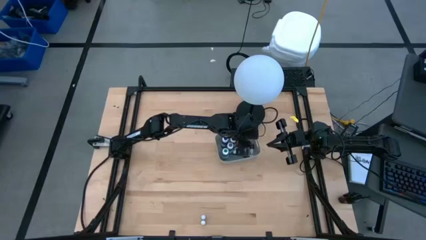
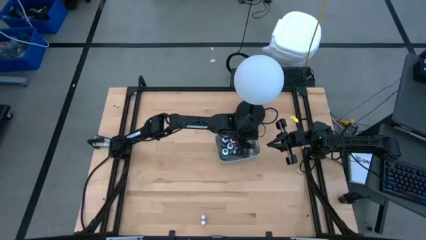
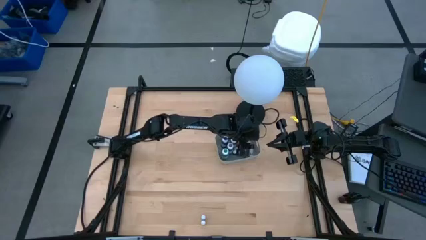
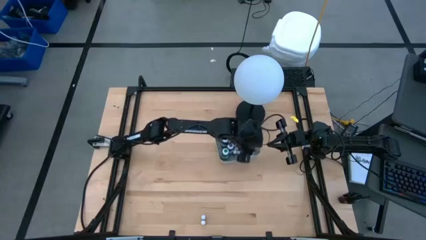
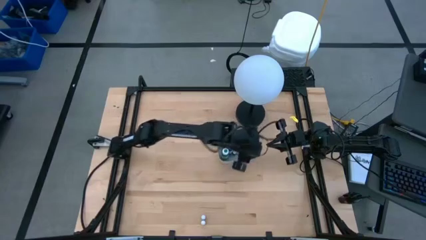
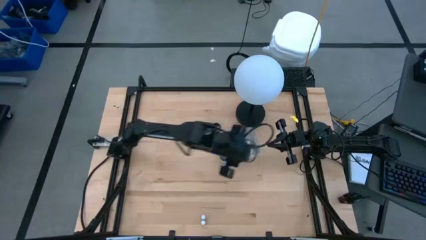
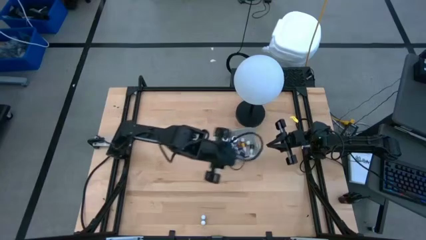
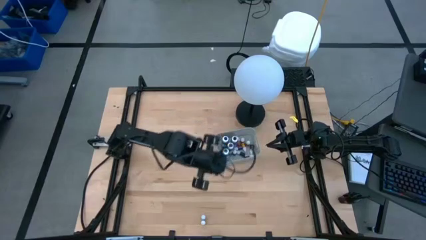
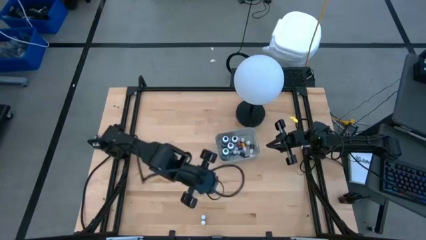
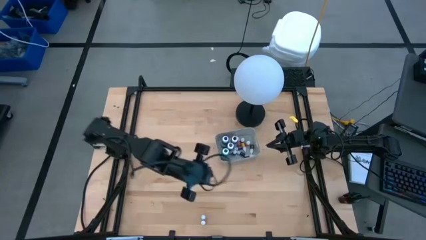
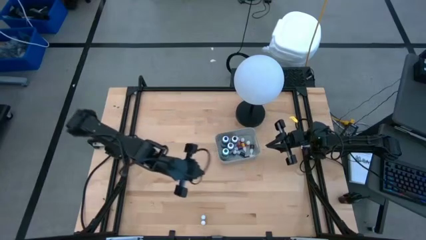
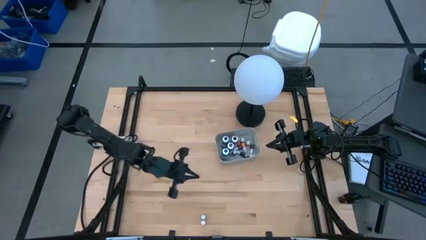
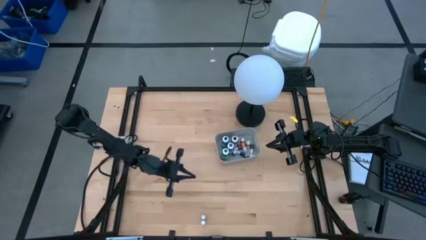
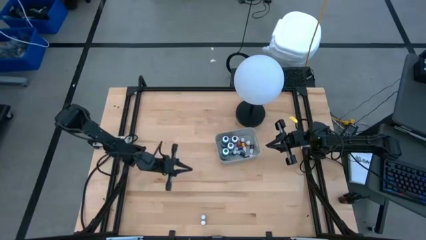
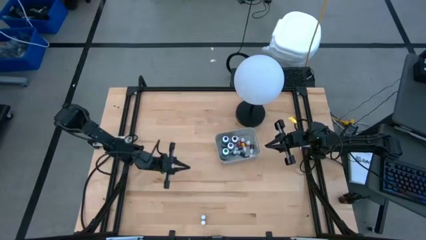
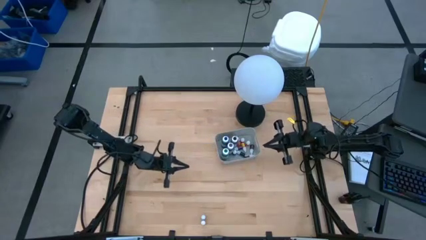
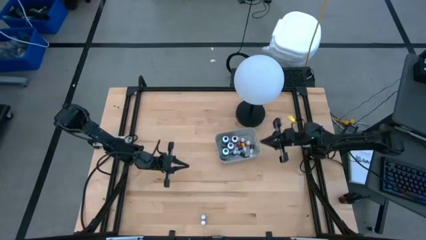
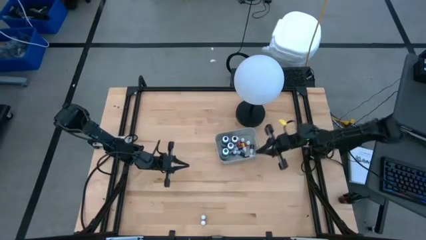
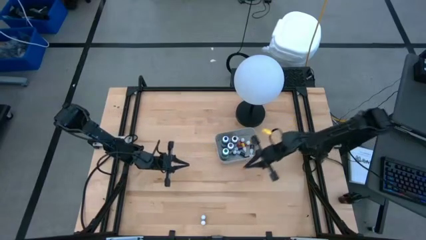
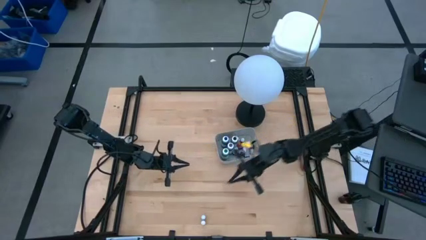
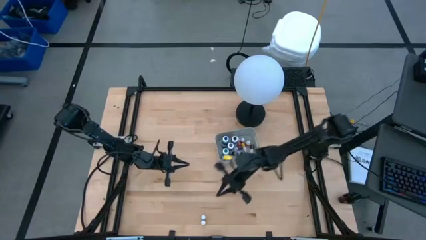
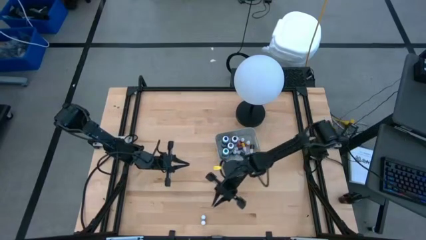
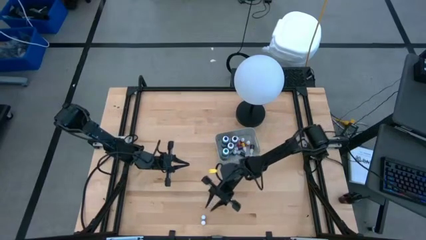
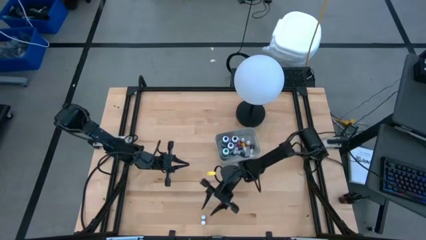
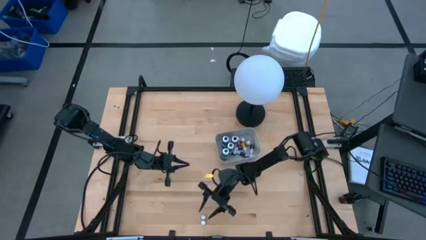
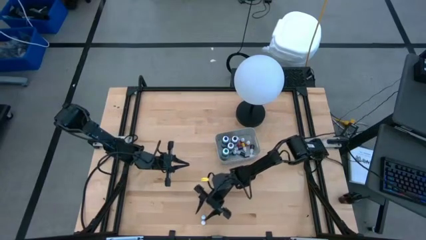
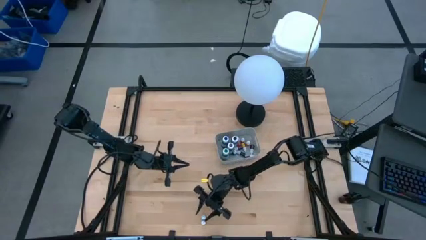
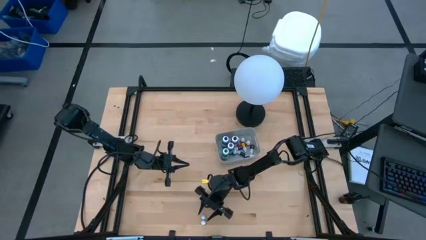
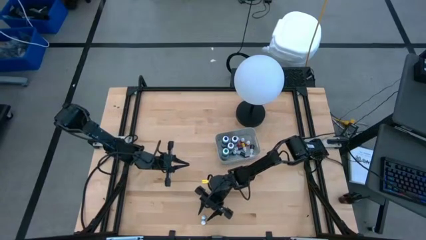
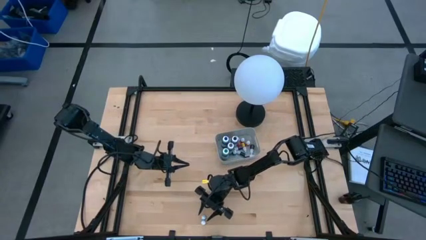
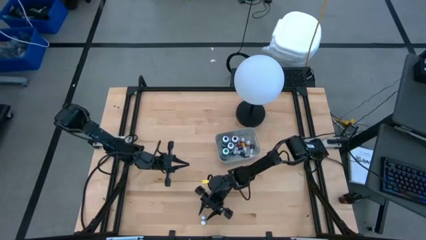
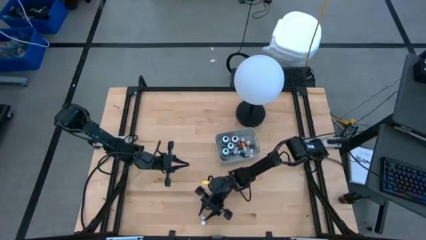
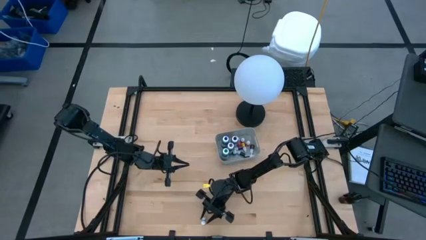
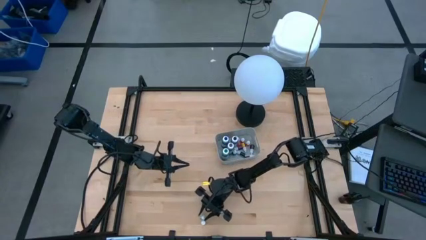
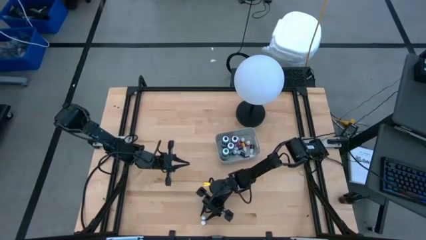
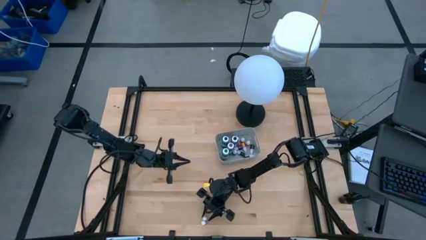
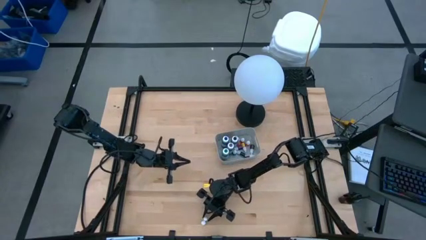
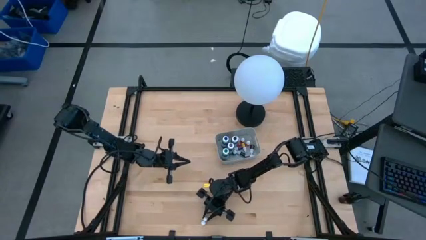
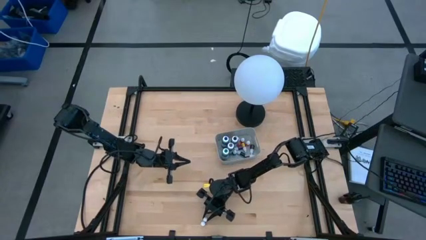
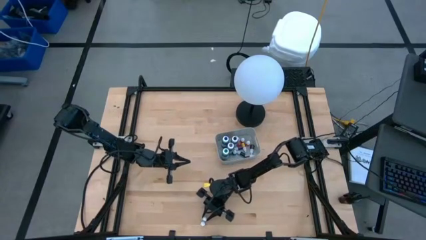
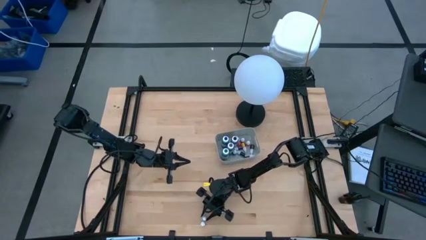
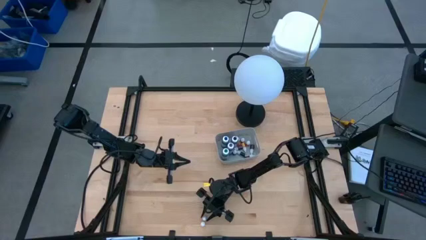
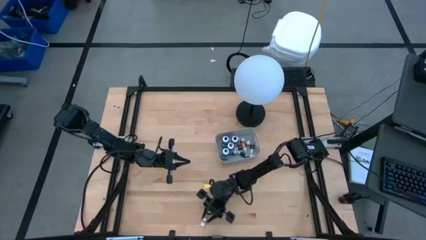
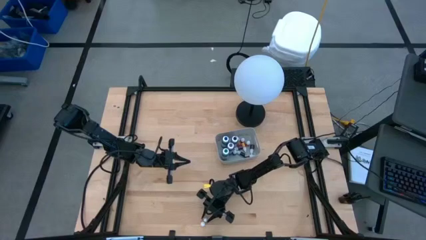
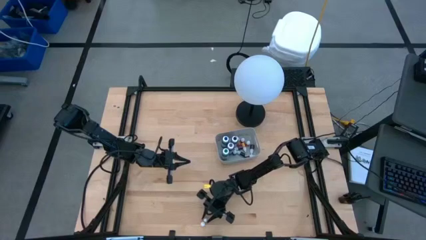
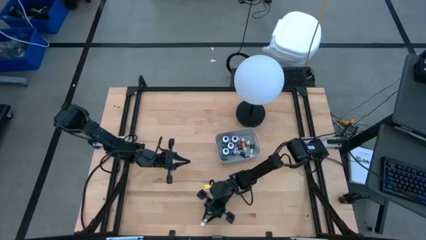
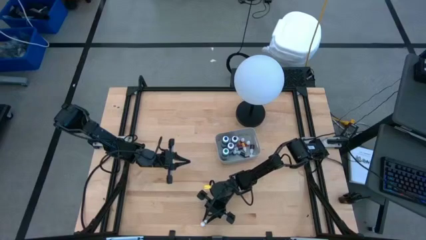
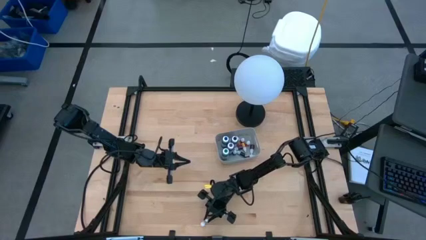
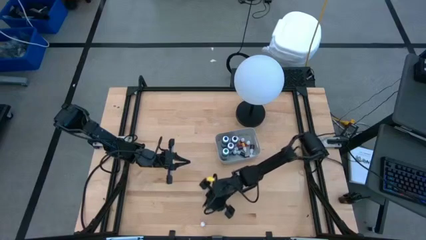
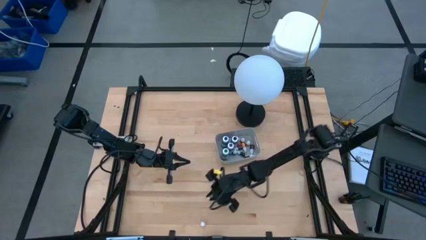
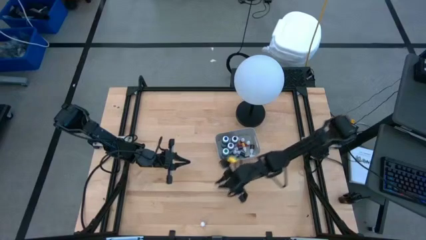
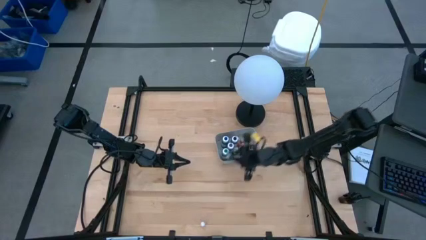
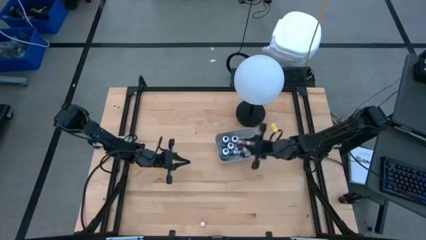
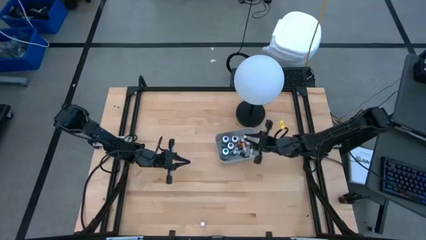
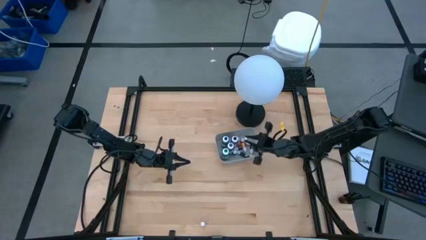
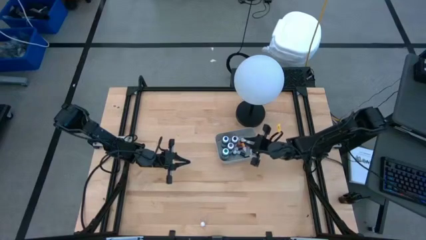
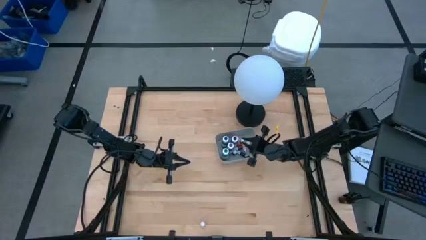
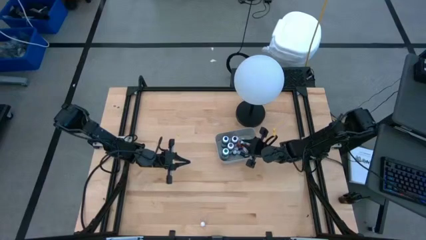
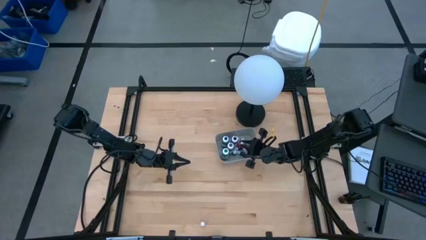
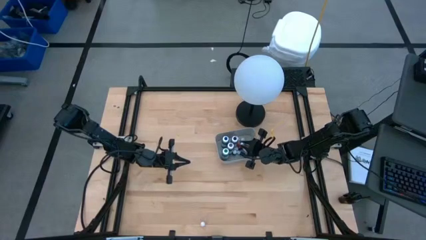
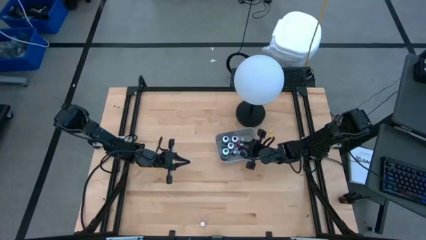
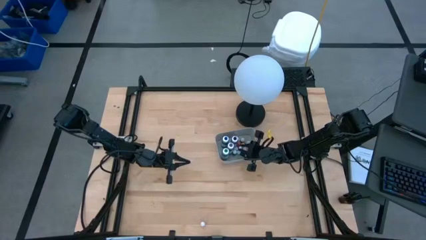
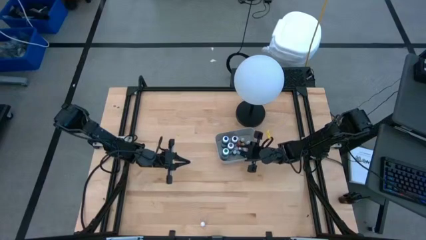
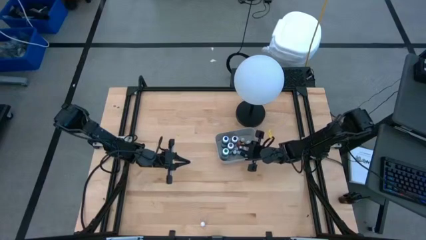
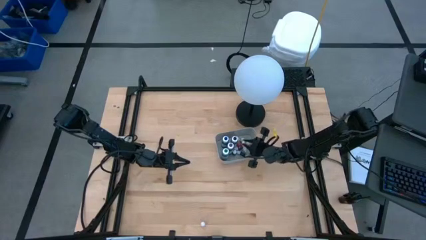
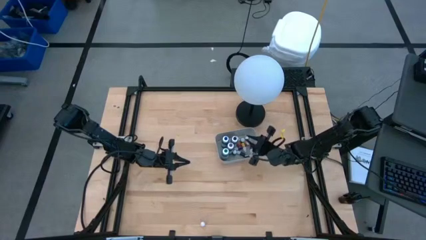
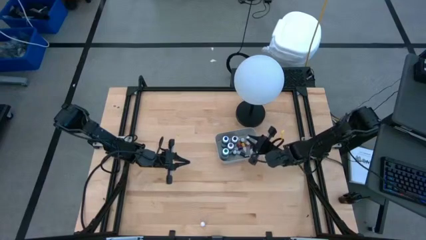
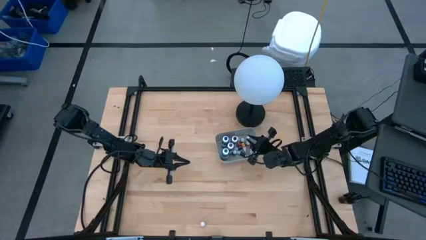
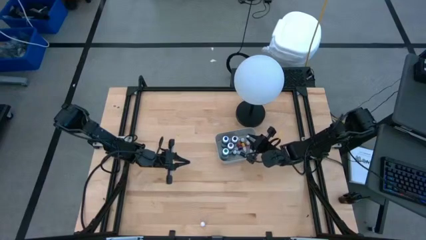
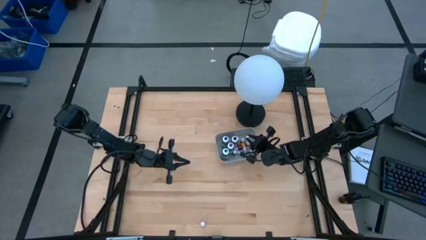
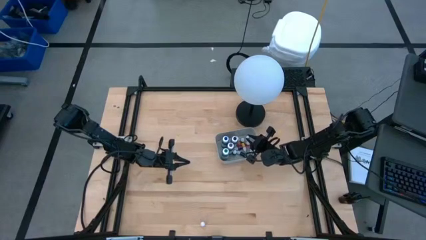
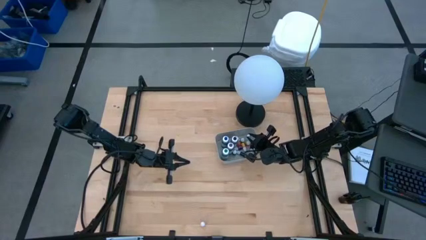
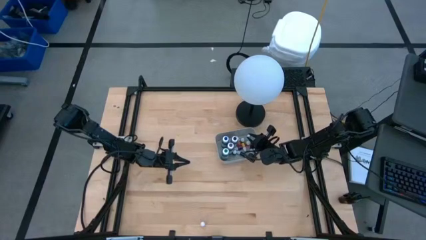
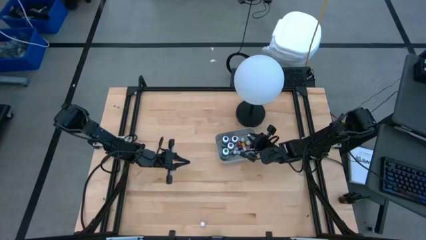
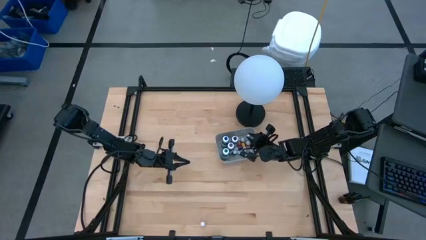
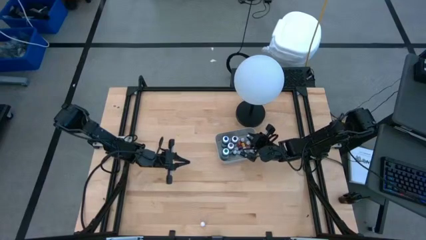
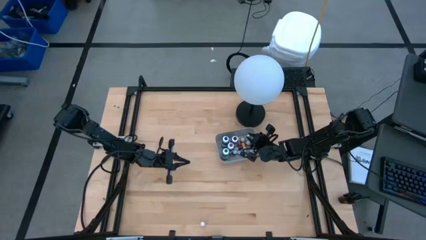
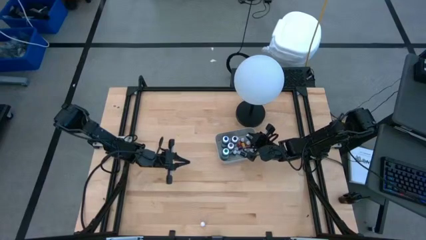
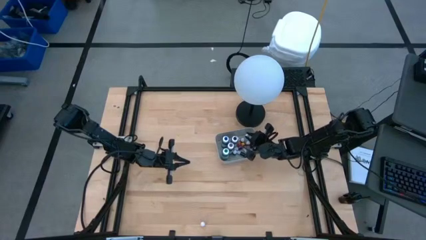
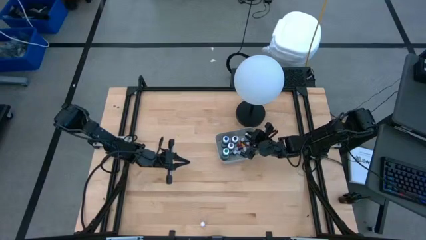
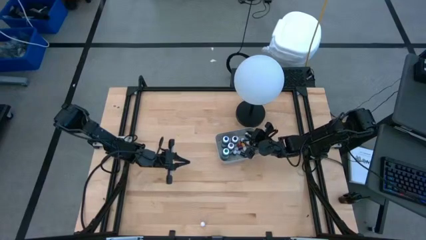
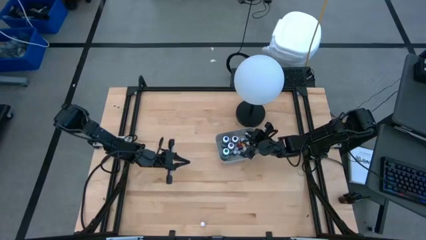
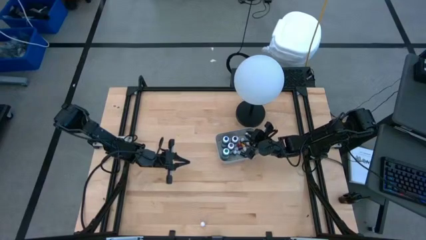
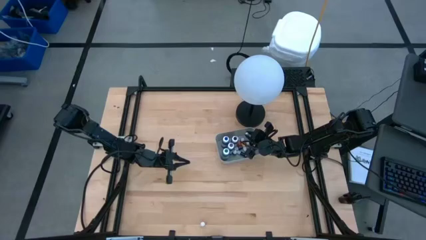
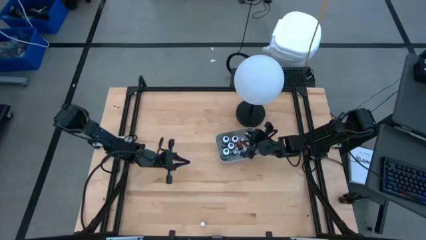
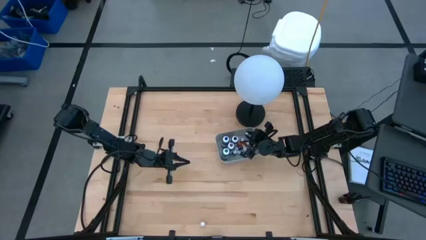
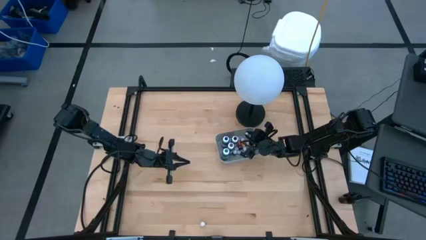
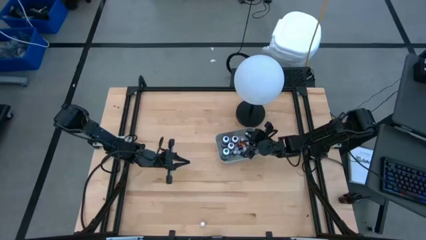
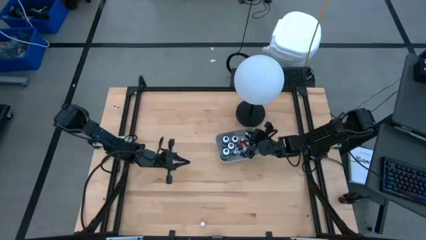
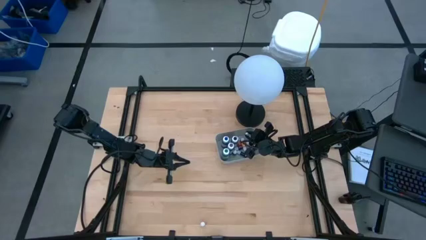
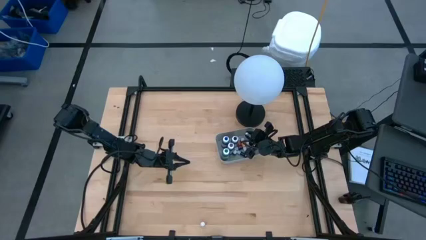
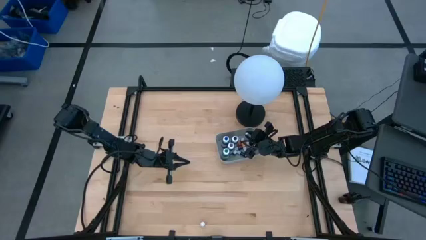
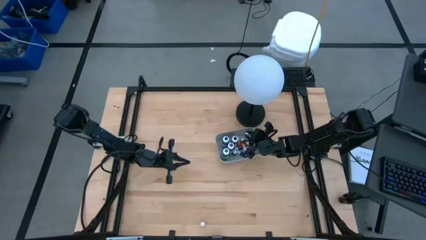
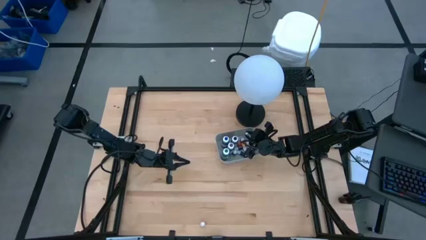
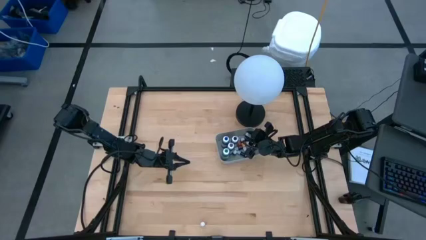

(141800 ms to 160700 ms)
Task: Pick & Place food coloring
Put the blue food coloring bottle into the gray bin
